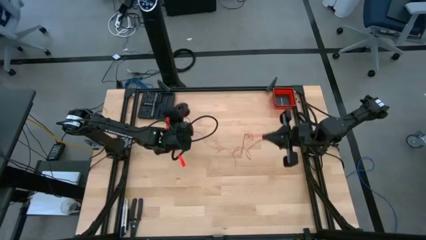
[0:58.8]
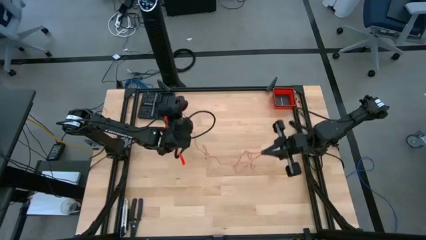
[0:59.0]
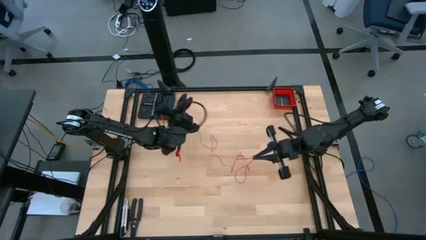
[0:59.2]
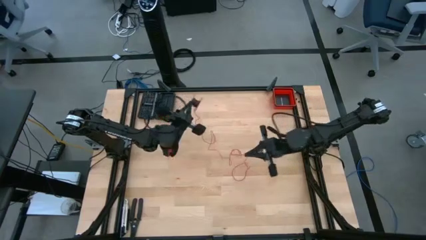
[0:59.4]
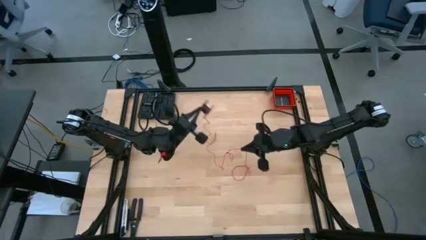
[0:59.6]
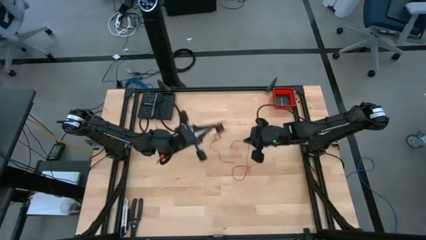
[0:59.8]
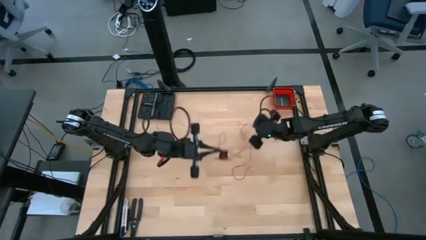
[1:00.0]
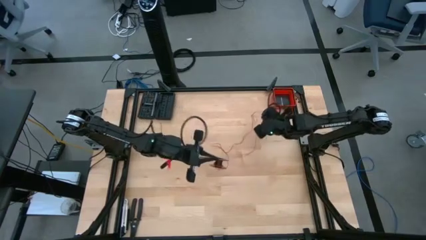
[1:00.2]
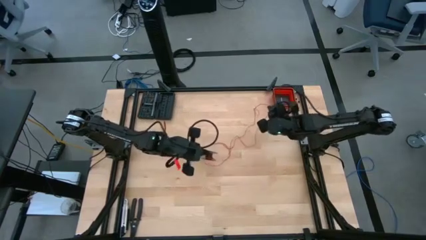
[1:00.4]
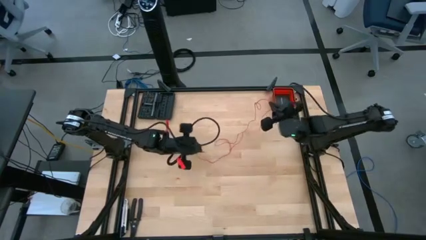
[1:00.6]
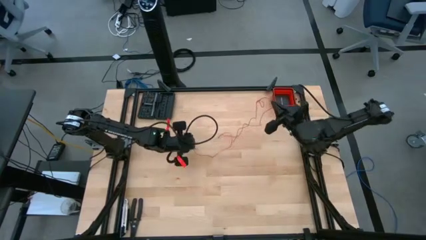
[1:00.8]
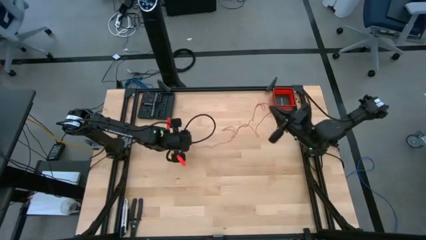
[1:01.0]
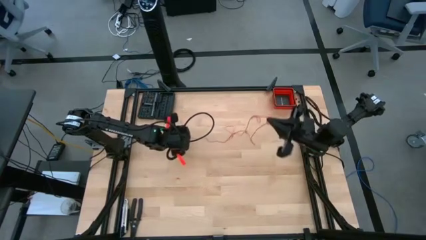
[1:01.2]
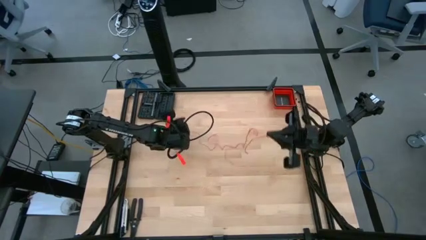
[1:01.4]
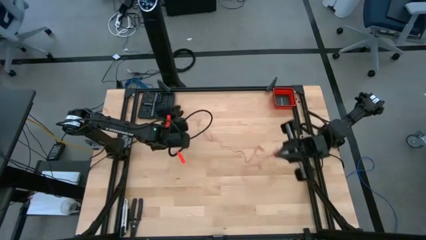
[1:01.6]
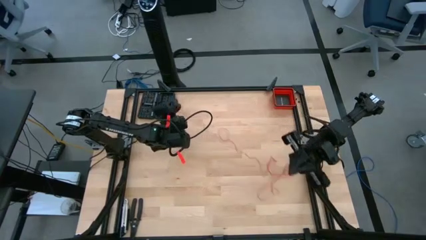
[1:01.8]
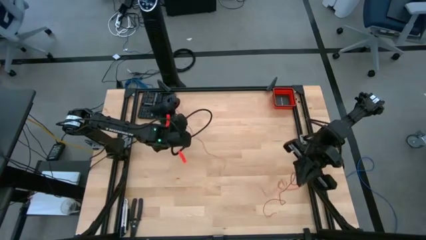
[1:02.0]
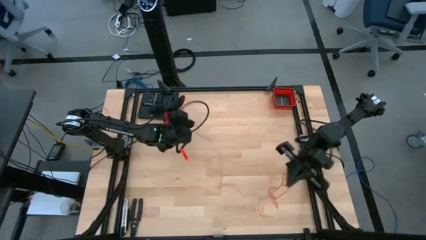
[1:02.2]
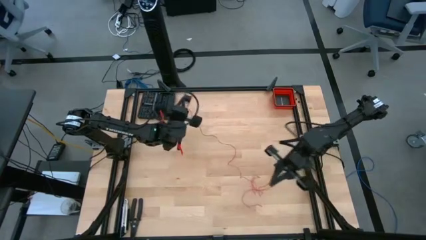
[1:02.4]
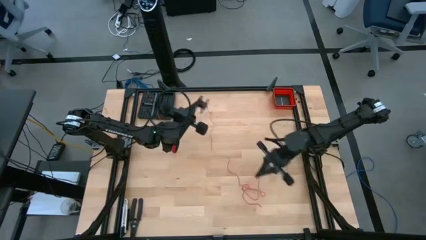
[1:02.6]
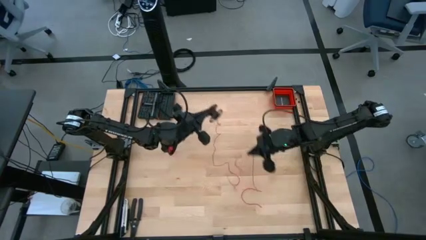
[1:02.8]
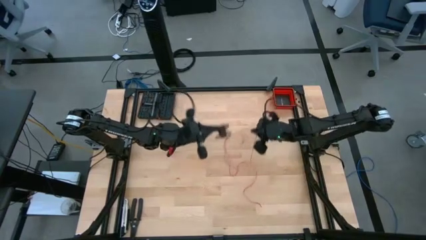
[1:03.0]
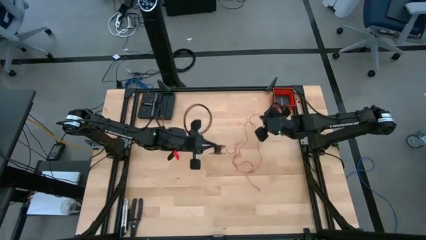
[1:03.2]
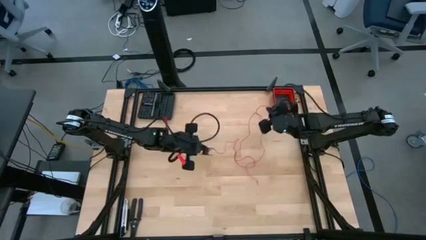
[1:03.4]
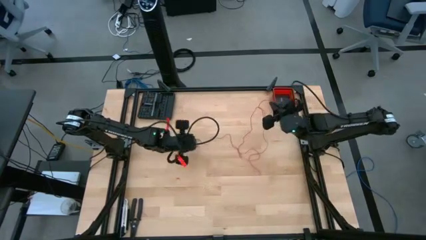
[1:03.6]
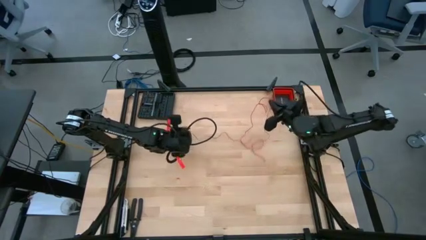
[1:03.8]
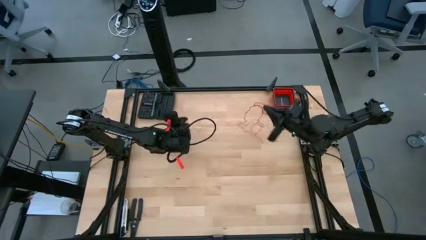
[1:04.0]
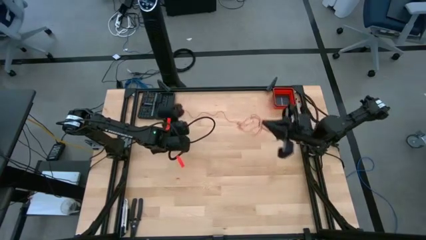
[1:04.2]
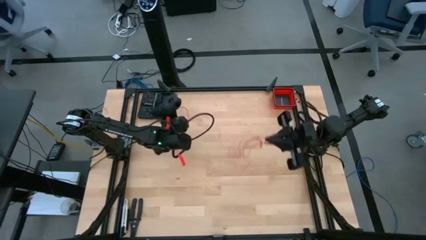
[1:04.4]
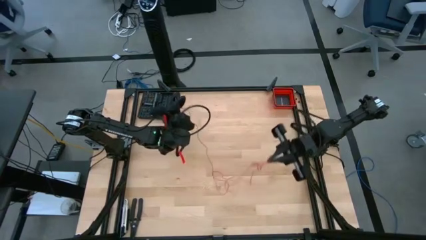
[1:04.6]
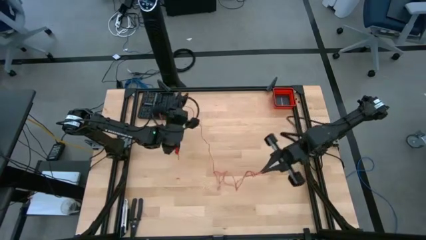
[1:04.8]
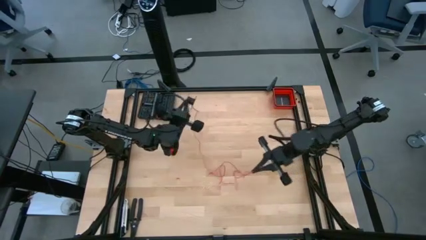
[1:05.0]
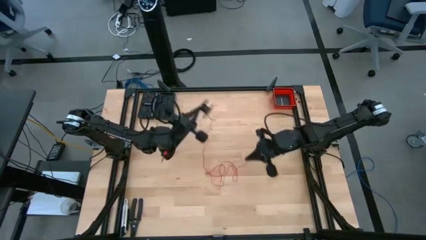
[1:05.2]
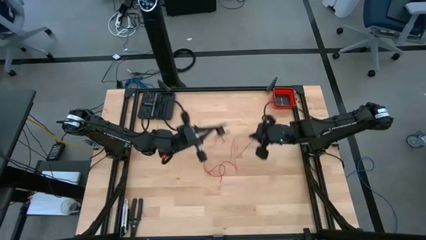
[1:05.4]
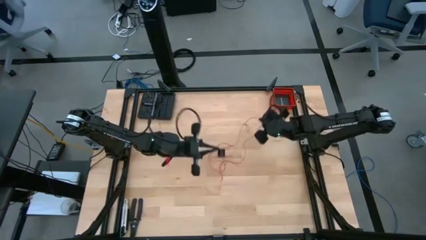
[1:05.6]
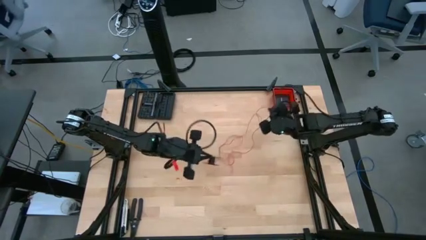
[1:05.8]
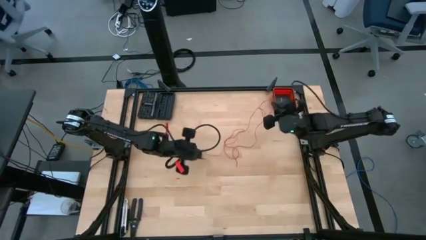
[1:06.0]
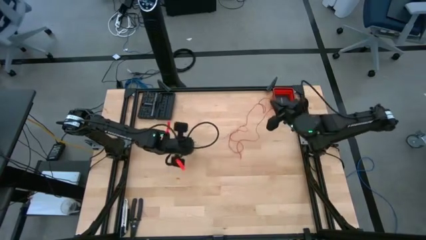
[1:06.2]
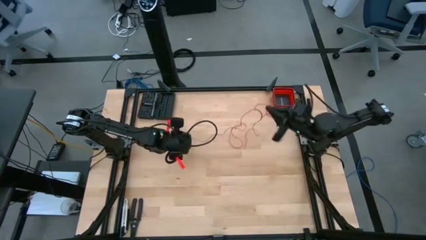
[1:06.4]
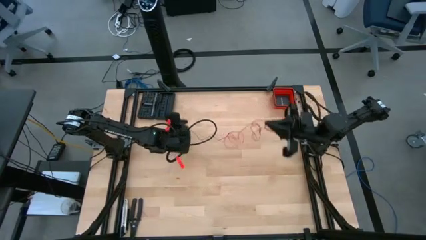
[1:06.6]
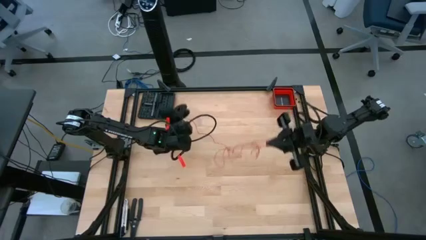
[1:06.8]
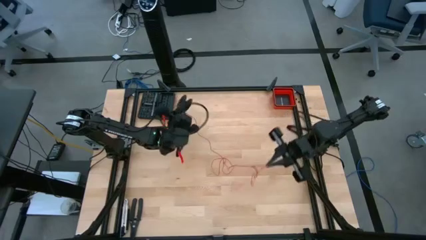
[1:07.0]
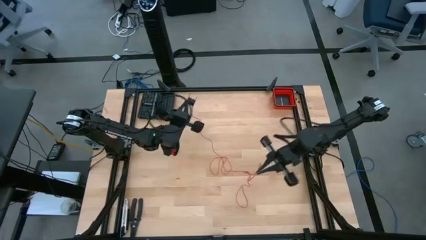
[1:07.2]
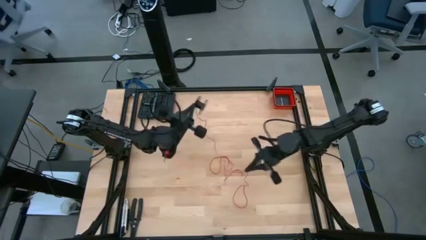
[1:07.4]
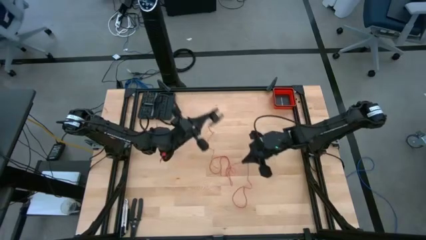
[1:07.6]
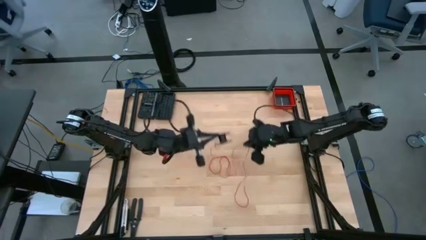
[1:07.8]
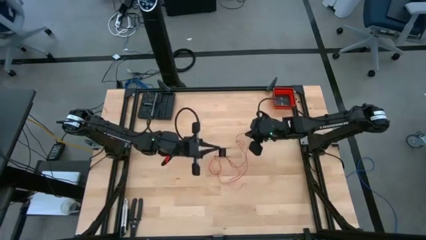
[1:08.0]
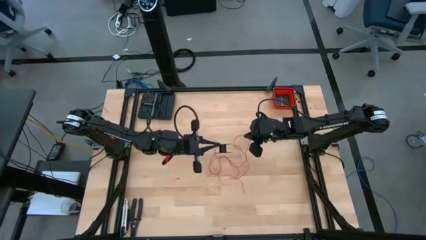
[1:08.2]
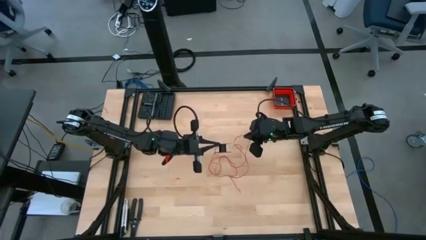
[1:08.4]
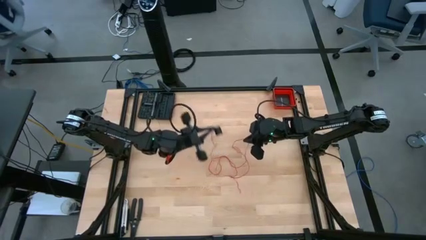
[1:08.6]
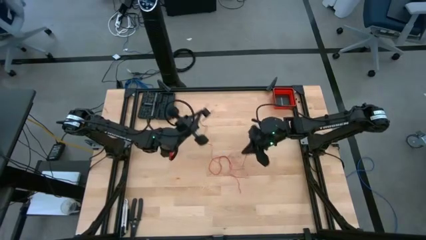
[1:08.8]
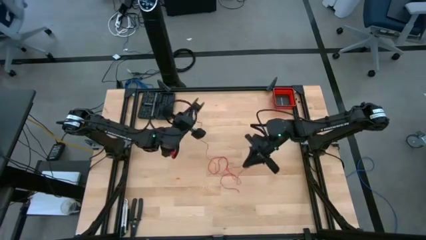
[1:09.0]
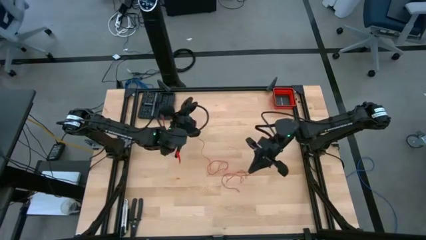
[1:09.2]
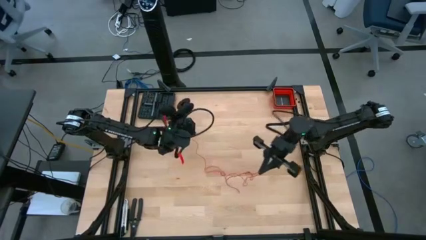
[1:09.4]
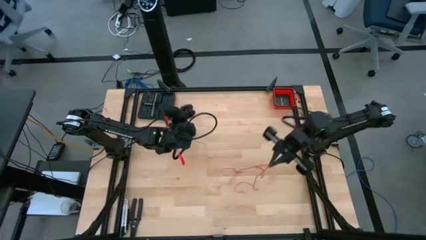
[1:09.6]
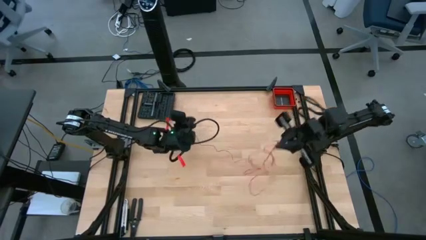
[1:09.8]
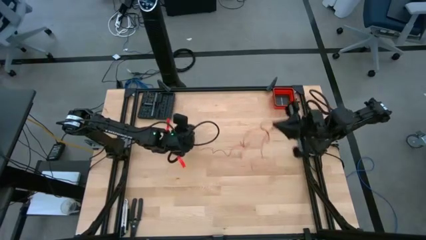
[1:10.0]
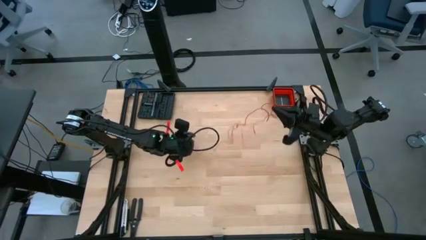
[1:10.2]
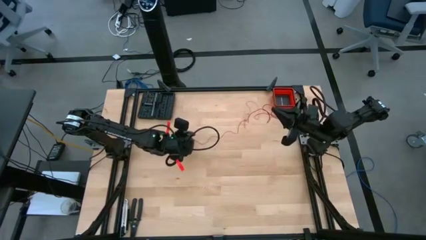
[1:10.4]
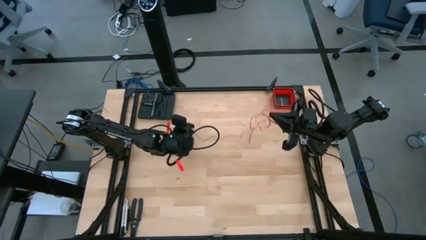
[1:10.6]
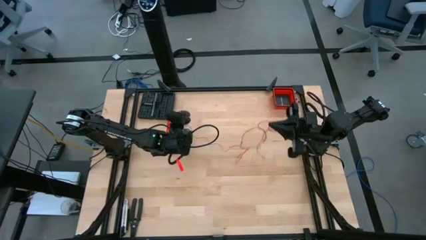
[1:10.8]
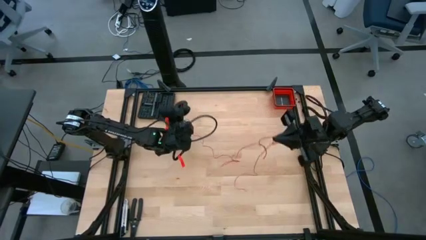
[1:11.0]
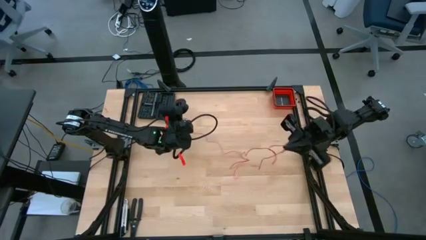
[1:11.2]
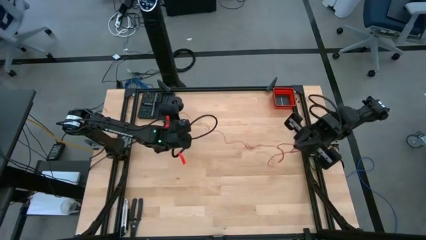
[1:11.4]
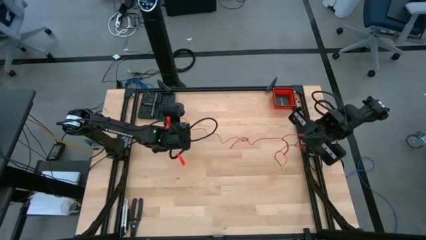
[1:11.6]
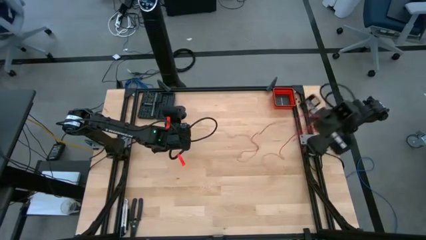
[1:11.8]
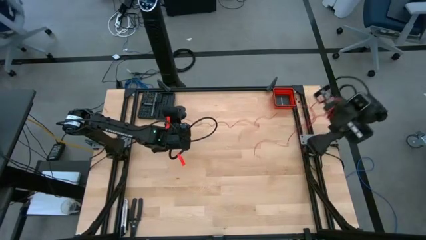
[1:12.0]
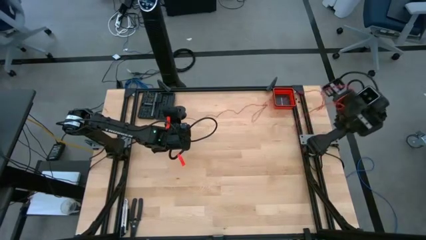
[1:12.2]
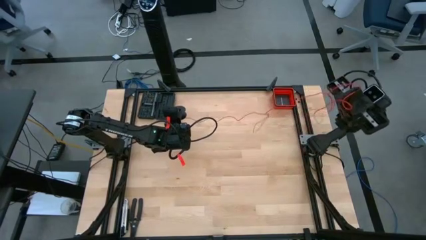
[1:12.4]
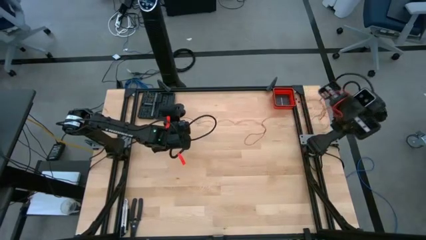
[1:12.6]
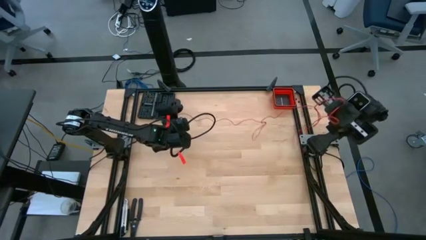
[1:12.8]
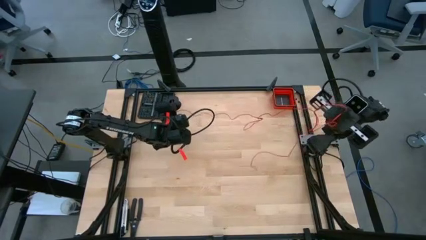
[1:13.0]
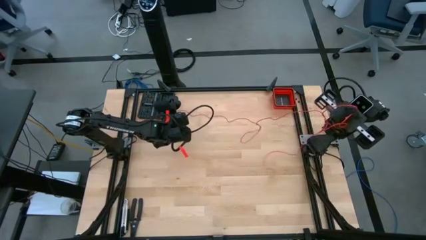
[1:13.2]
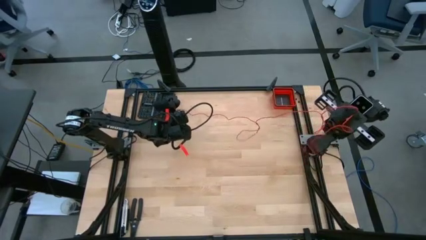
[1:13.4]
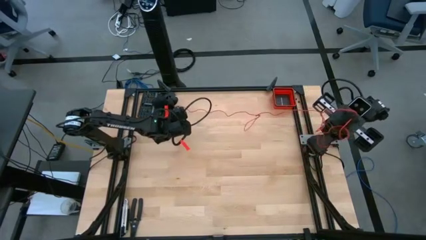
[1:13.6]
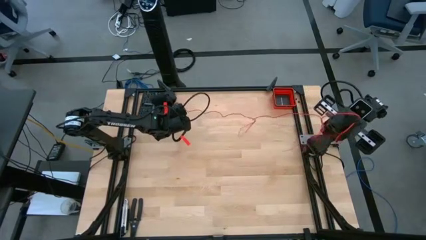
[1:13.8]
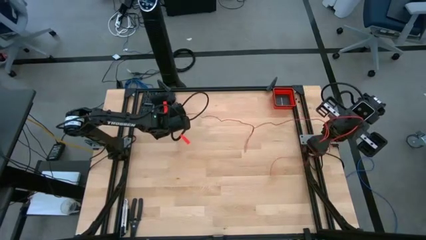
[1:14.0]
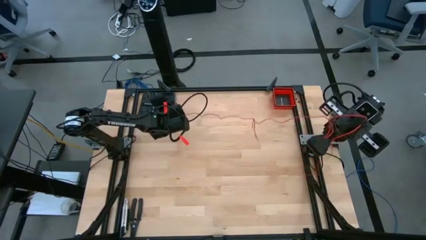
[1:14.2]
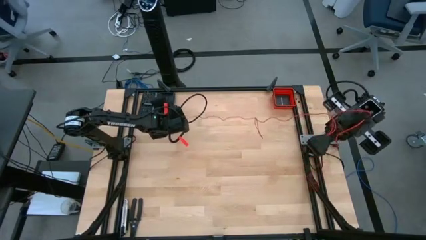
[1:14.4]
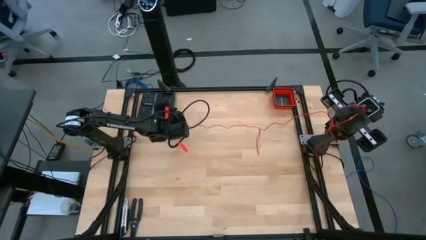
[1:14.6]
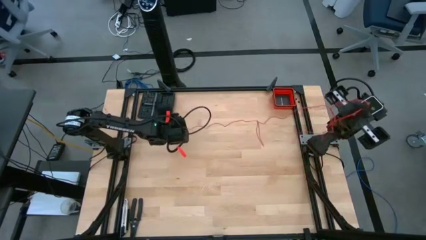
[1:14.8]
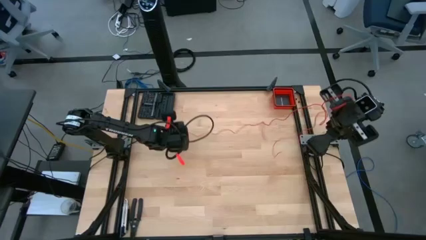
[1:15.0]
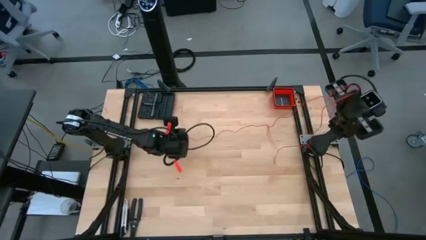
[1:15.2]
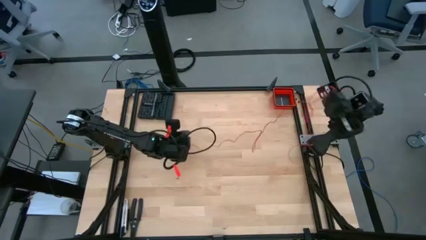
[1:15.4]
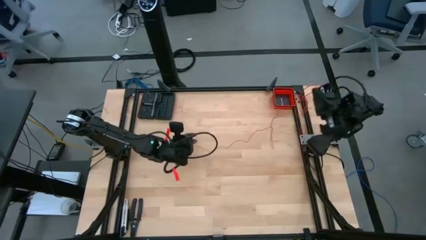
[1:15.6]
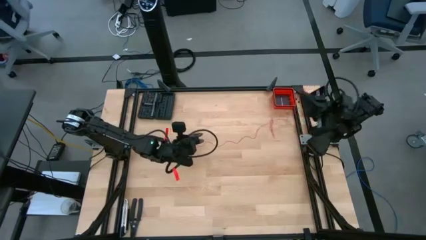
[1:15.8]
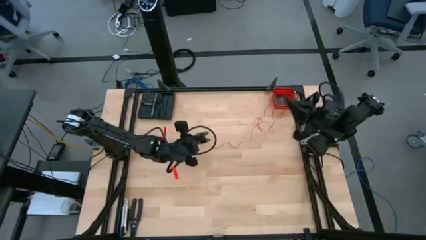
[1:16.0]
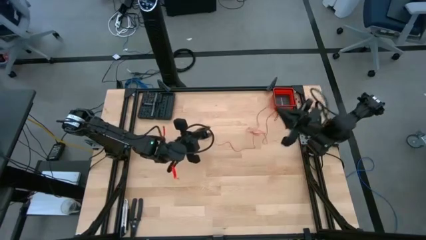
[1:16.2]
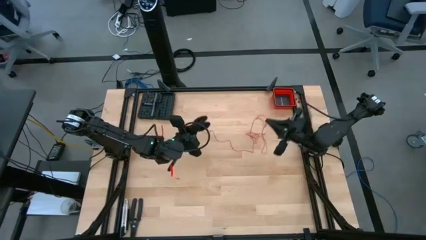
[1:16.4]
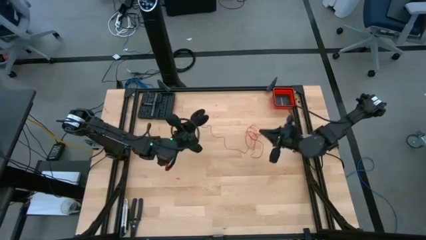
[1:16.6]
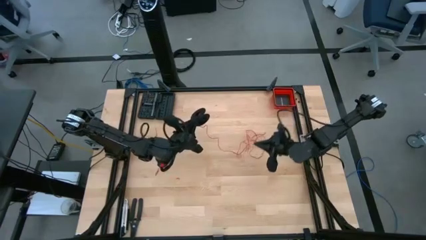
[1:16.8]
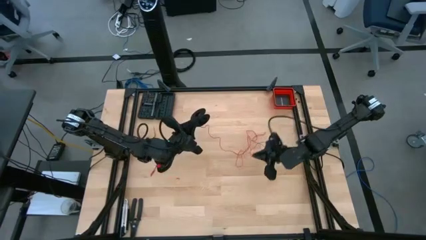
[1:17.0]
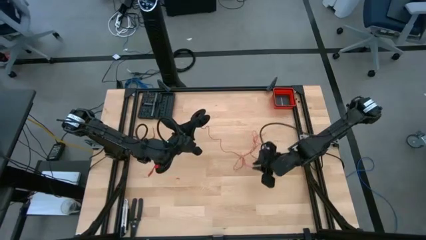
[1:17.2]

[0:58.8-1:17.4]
Task: Coil cords
Uncoil the red wire from the black spool
